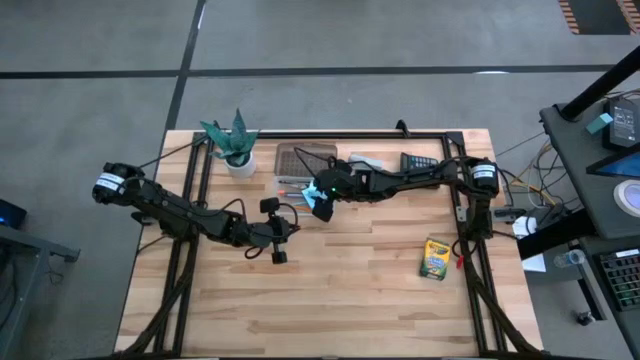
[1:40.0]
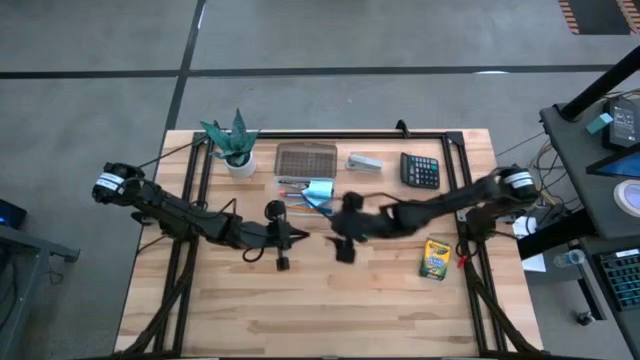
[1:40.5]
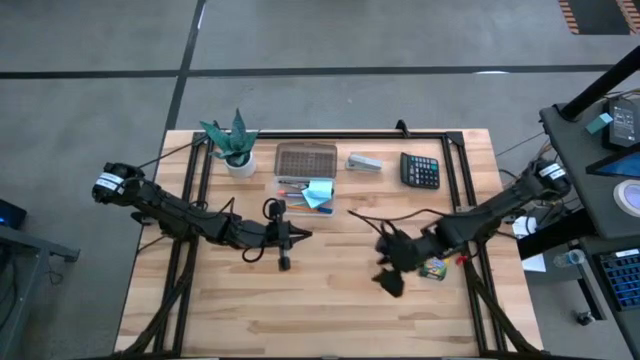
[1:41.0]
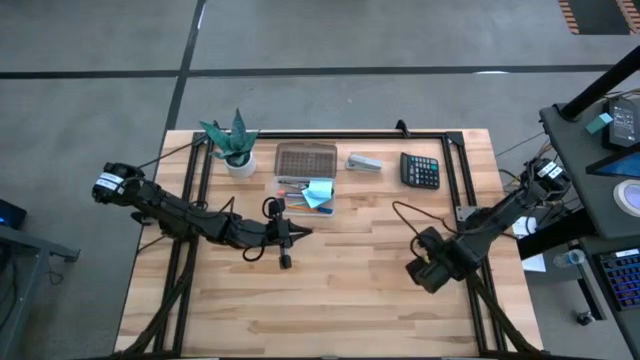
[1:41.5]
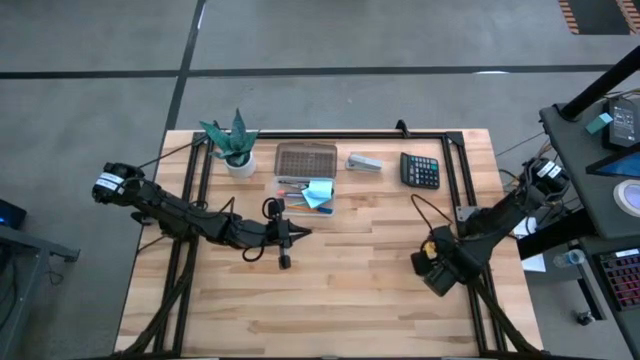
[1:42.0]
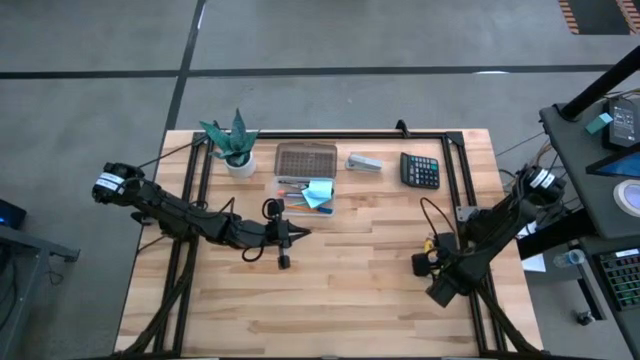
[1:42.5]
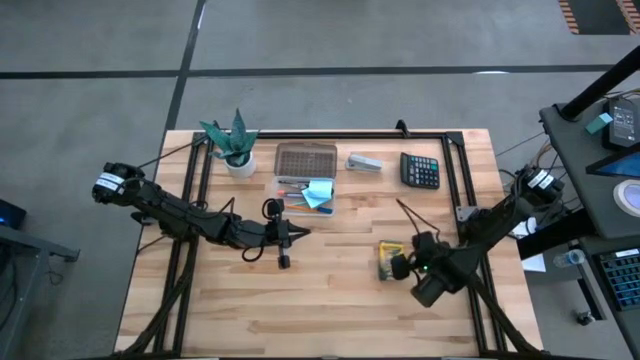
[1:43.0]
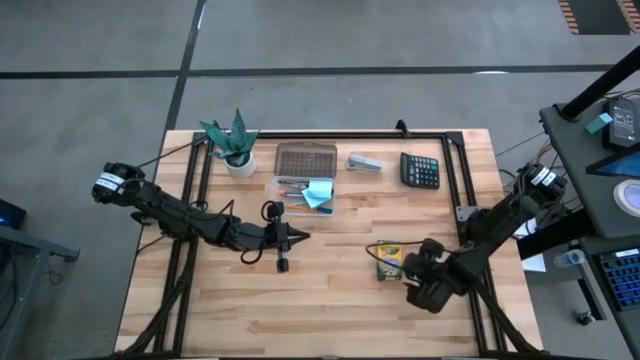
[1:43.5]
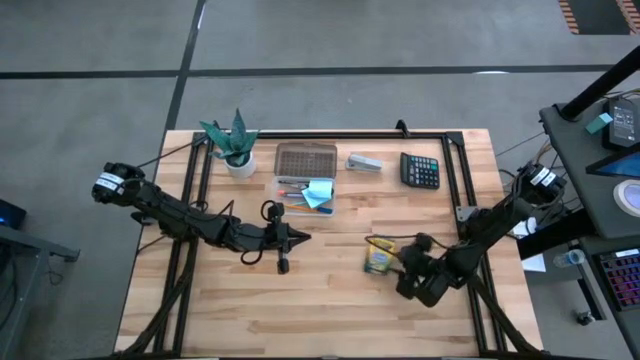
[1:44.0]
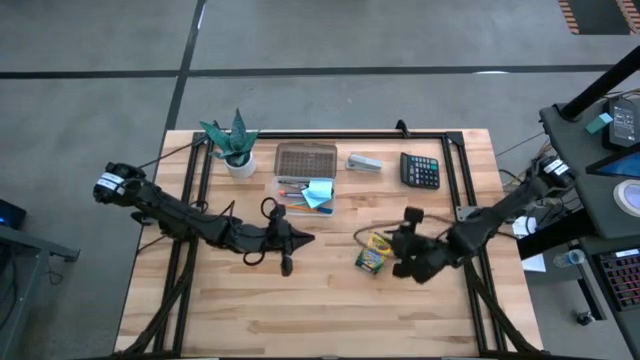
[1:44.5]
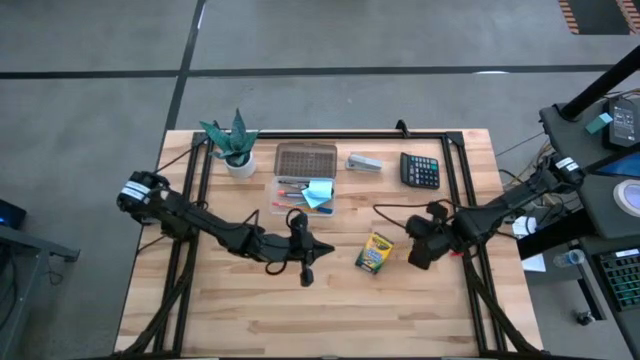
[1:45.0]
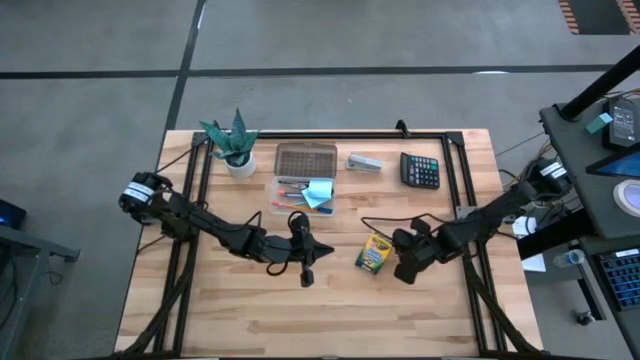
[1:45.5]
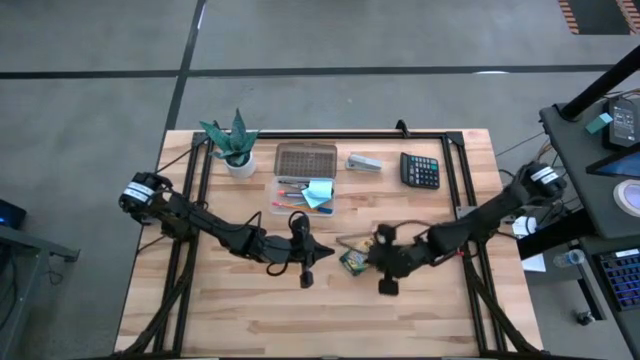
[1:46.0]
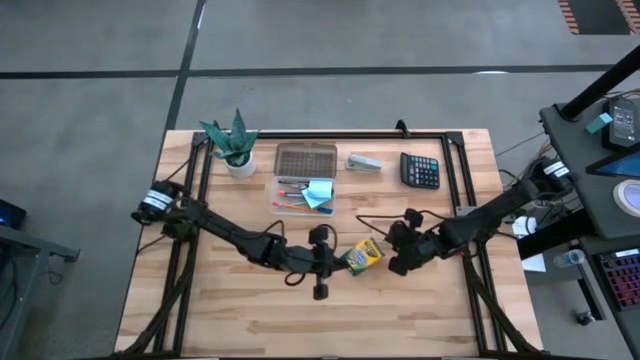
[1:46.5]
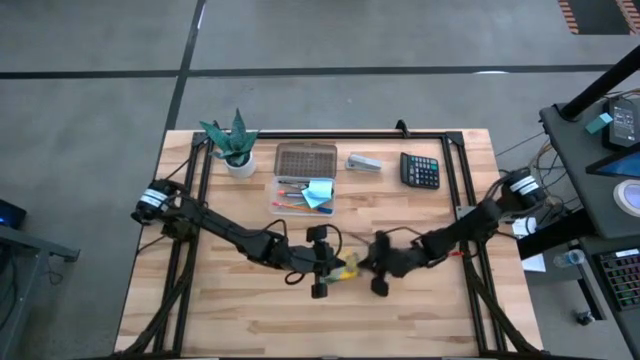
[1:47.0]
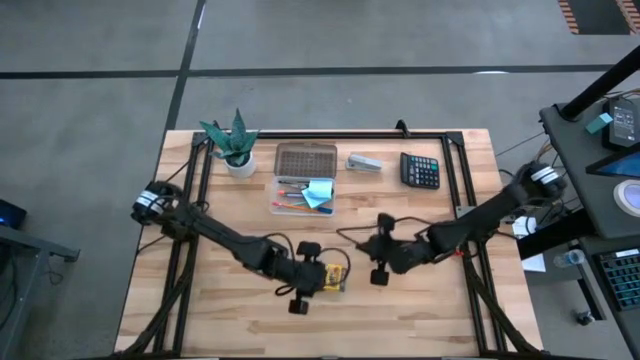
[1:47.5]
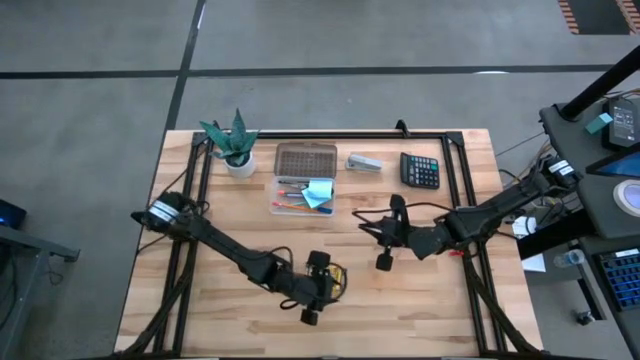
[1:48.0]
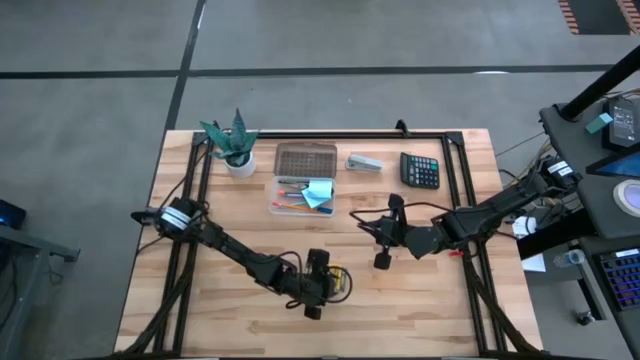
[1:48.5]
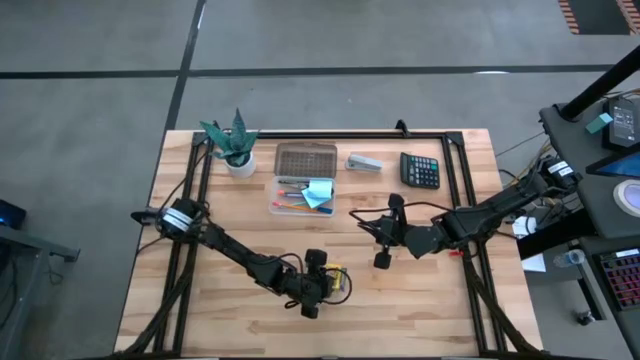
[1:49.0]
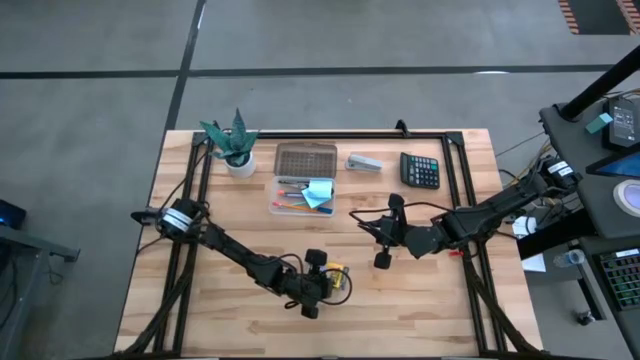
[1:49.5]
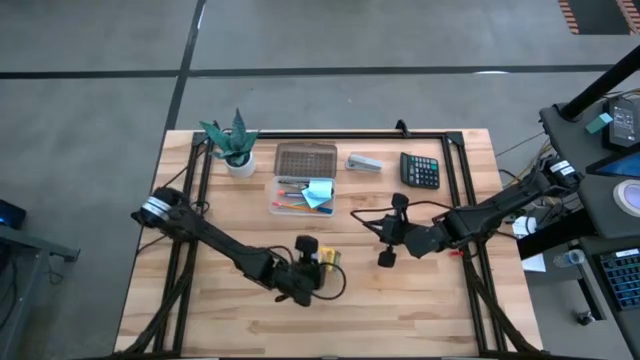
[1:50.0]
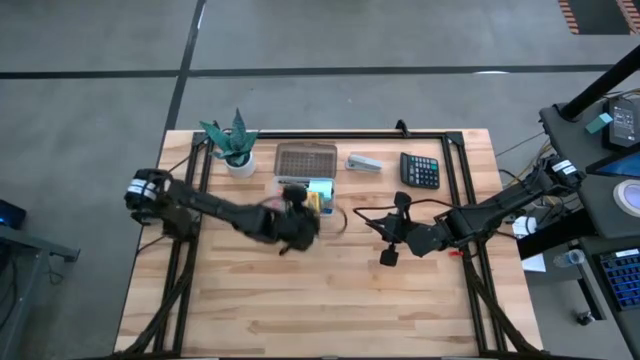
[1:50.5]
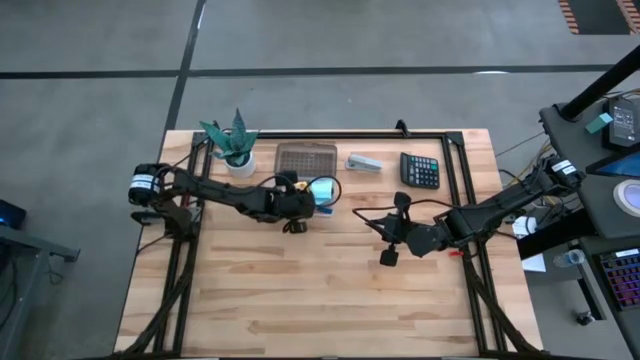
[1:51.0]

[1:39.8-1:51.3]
Task: Pack school essentials
Put the yellow crayon box into the supply box

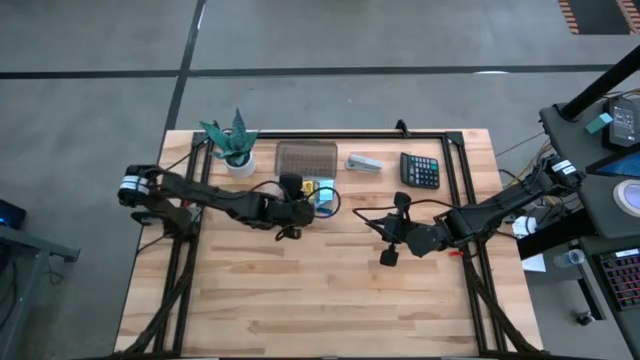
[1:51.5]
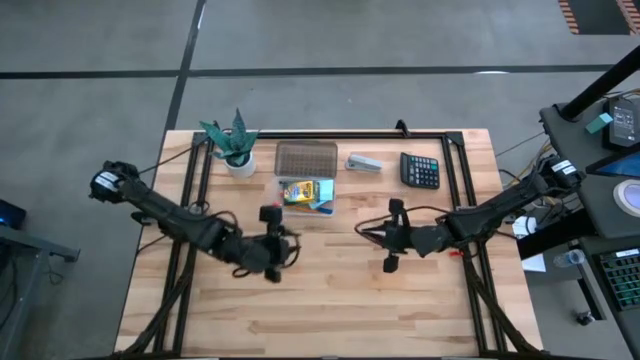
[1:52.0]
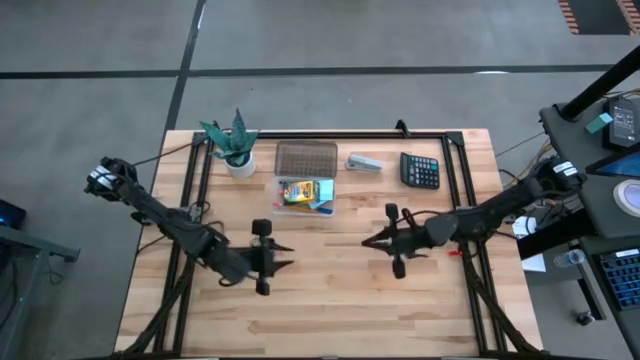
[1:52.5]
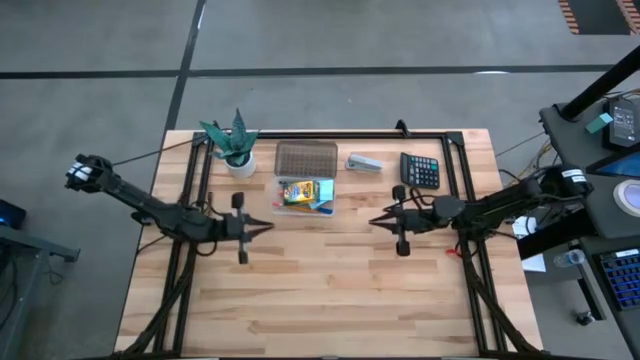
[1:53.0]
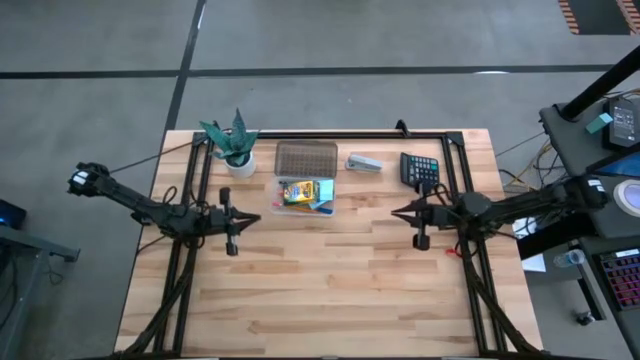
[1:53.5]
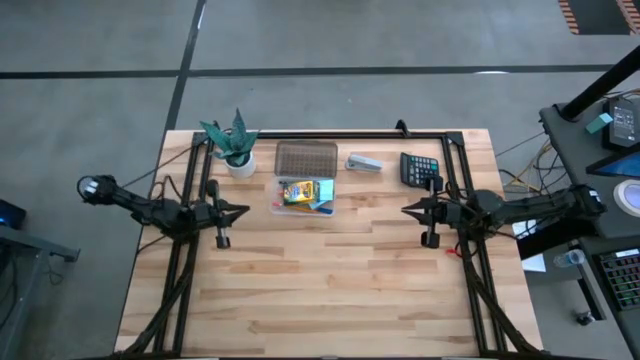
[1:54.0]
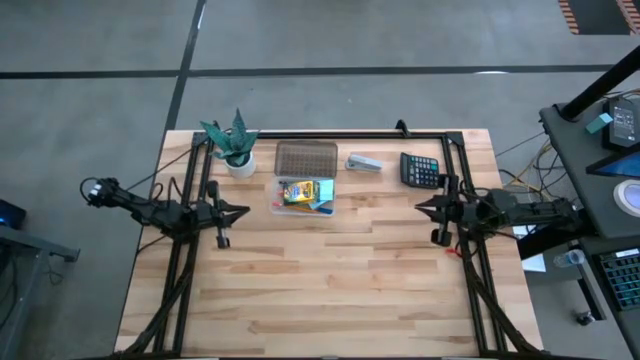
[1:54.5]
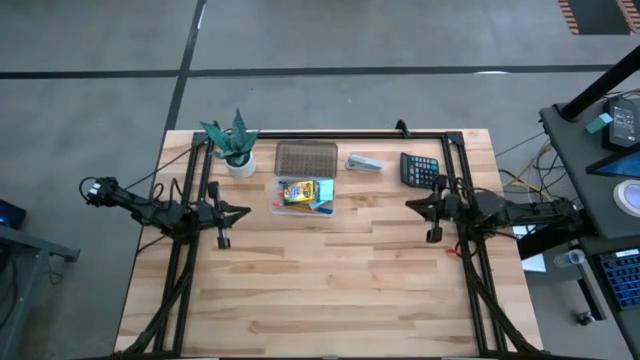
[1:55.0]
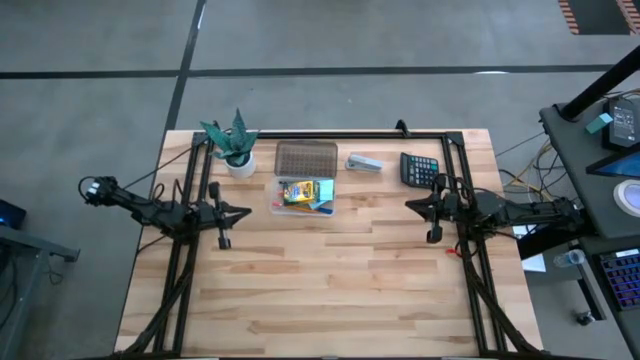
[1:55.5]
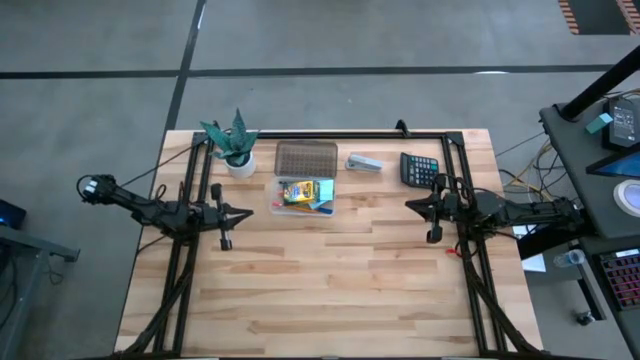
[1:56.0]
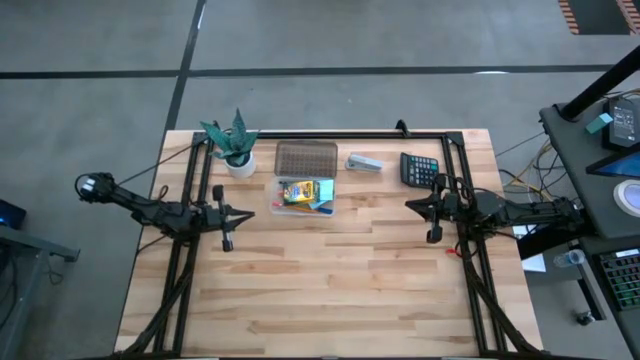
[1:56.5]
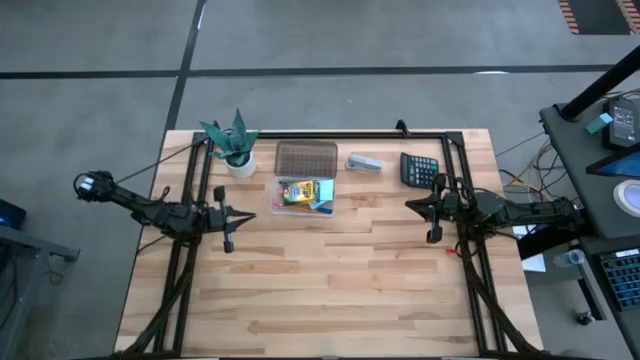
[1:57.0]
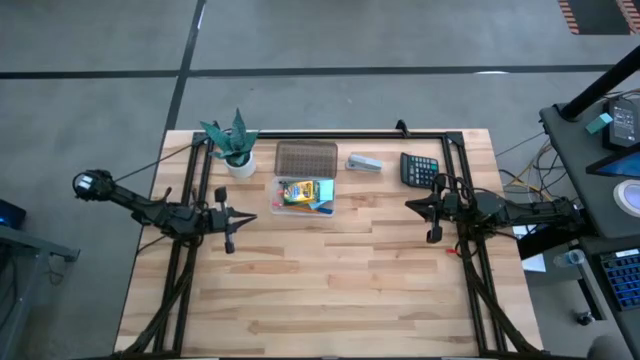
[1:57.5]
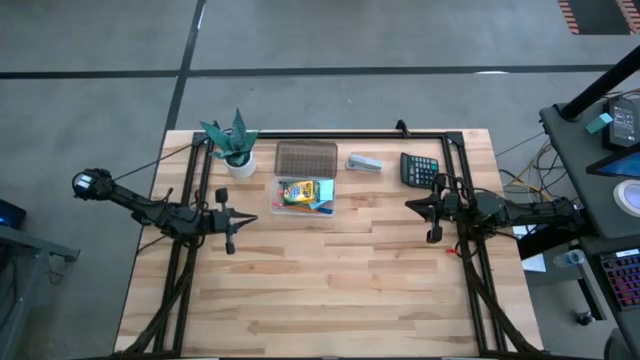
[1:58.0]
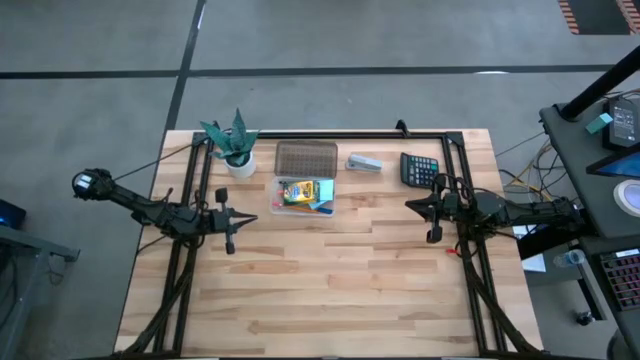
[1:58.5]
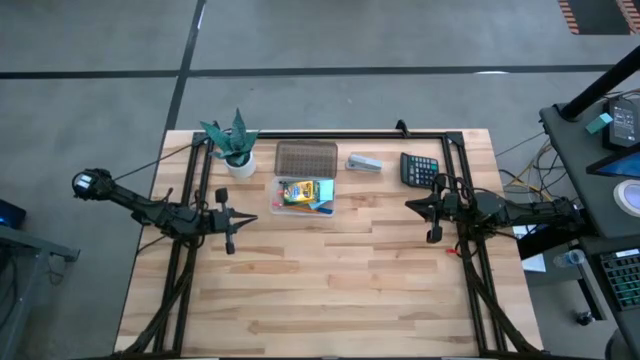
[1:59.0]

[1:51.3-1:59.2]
Return to Home Position

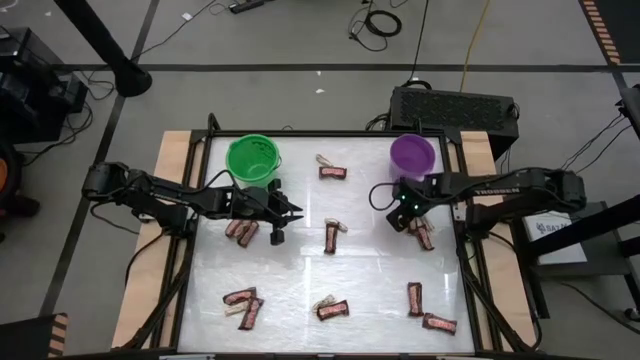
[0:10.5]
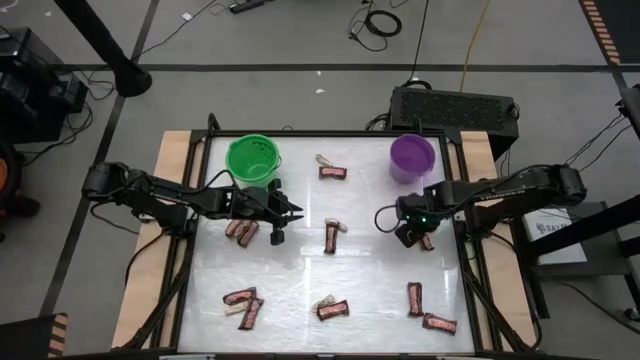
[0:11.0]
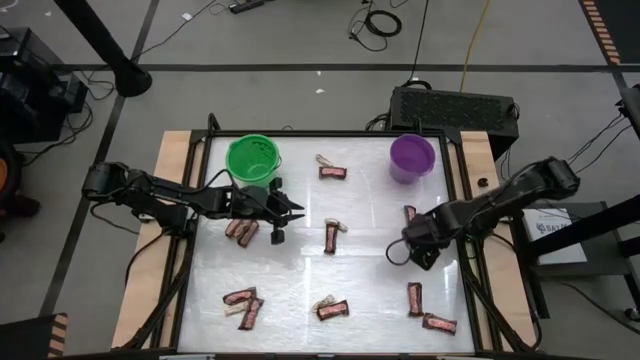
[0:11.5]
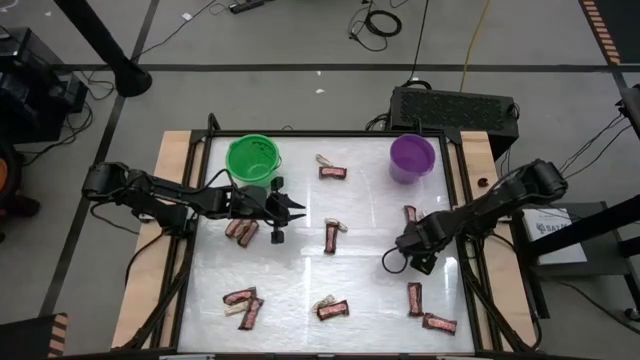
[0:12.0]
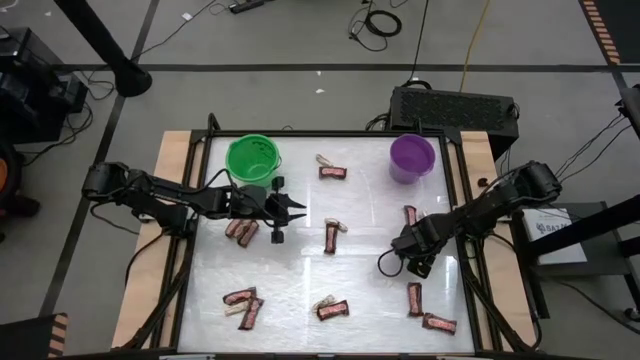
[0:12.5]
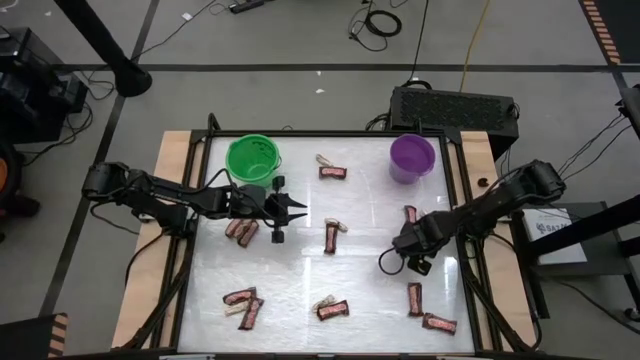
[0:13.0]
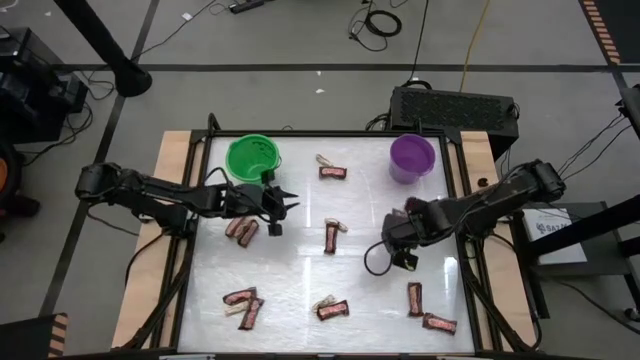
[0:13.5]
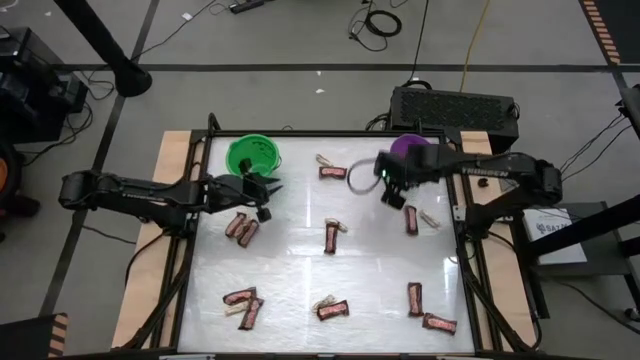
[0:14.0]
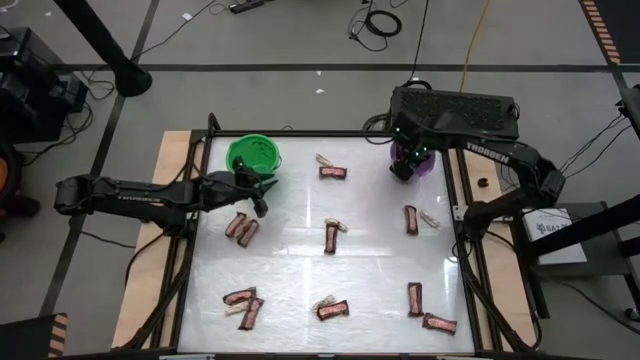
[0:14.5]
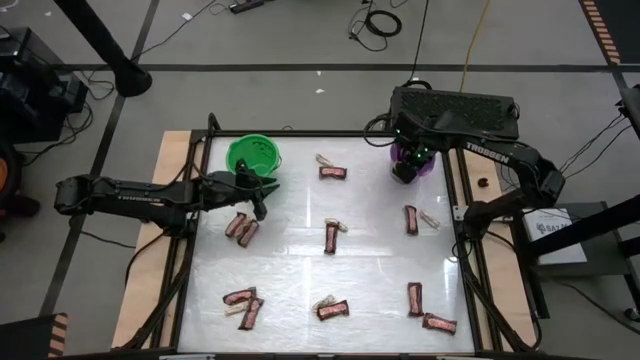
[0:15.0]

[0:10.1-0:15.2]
Task: Sort candy by brand, put in halloween buckets
Put the brown chocolate bar into the purple bucket
